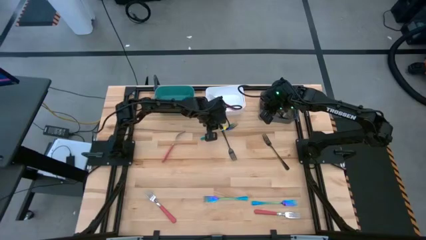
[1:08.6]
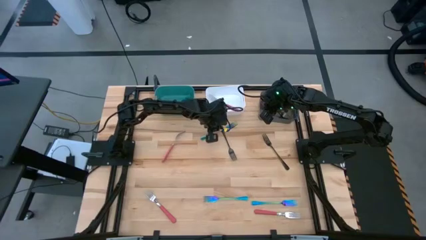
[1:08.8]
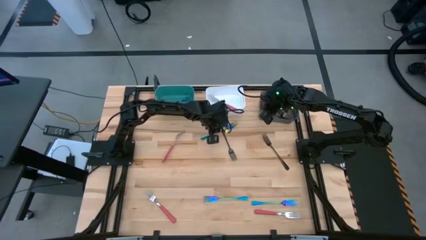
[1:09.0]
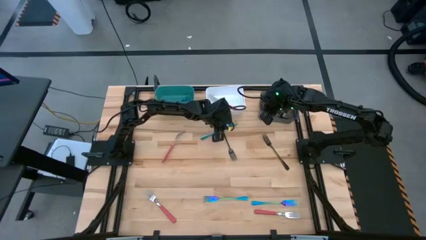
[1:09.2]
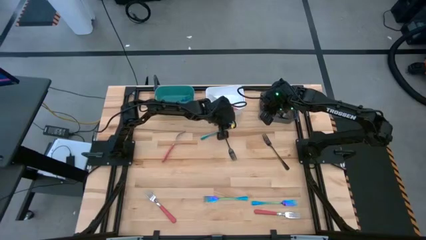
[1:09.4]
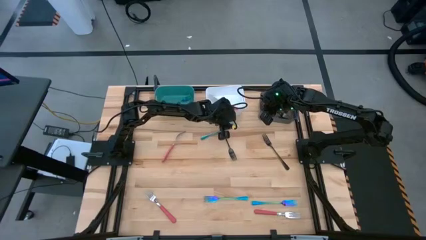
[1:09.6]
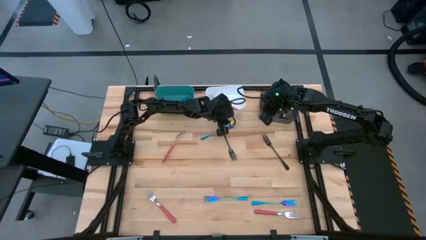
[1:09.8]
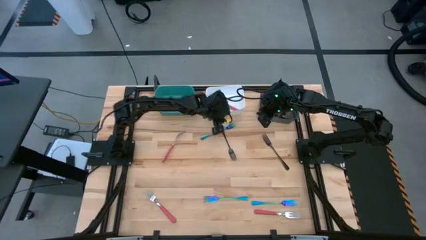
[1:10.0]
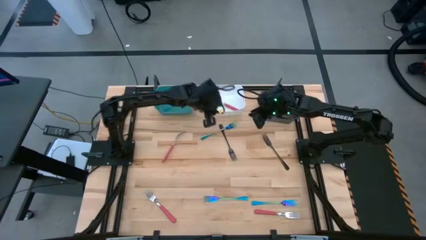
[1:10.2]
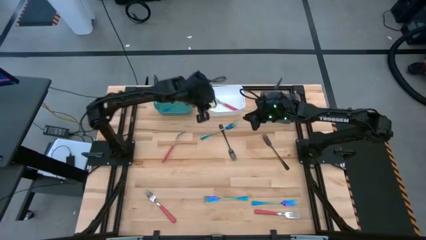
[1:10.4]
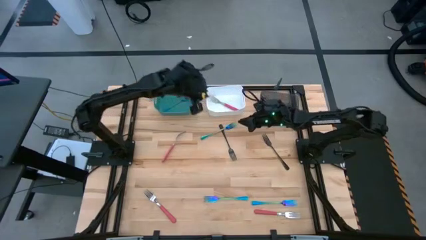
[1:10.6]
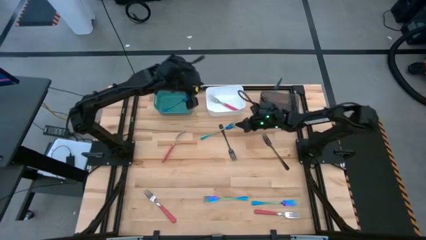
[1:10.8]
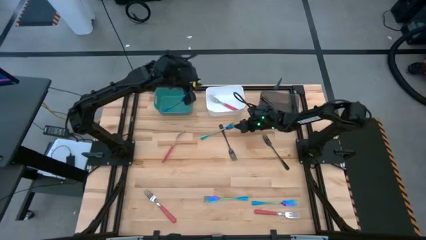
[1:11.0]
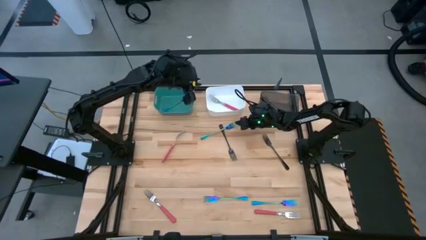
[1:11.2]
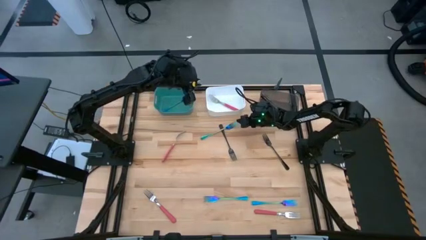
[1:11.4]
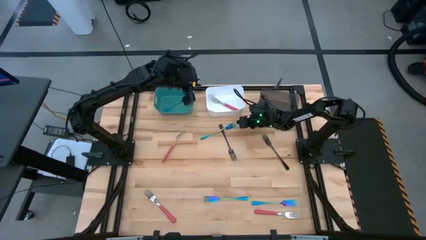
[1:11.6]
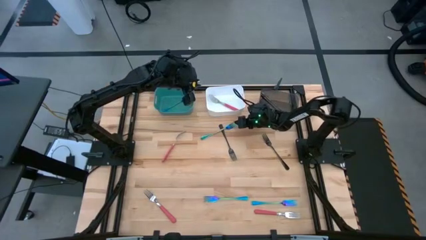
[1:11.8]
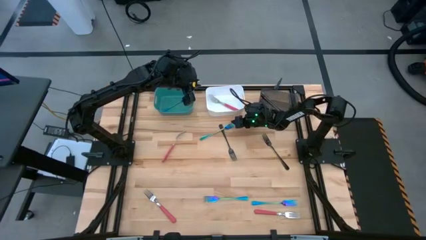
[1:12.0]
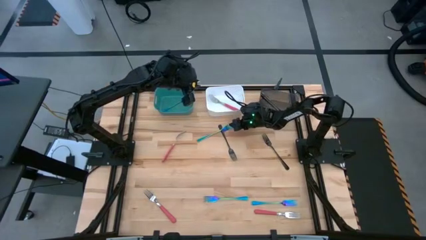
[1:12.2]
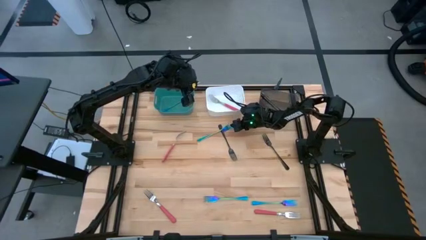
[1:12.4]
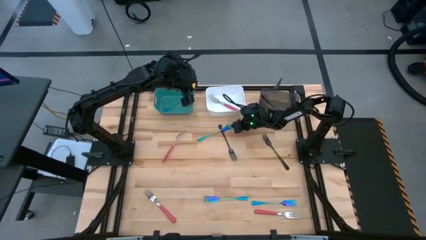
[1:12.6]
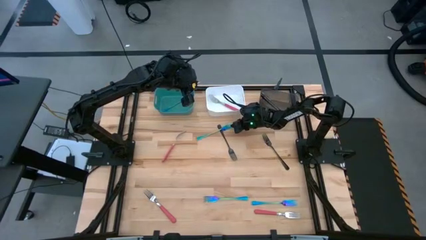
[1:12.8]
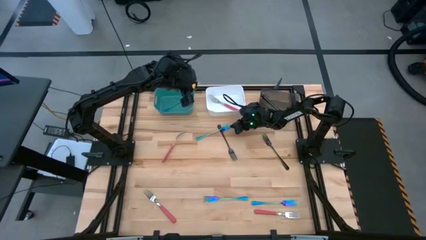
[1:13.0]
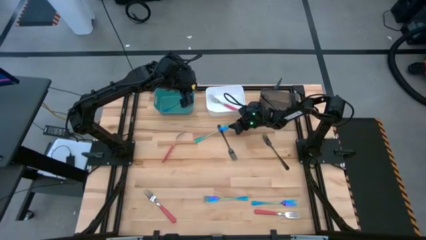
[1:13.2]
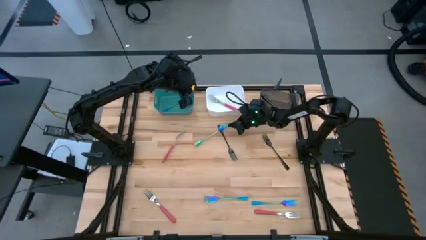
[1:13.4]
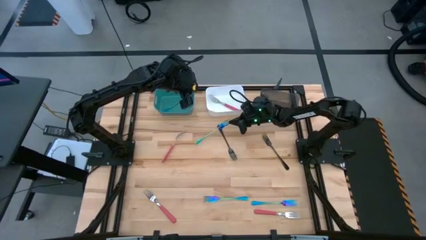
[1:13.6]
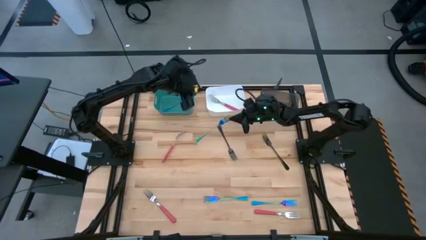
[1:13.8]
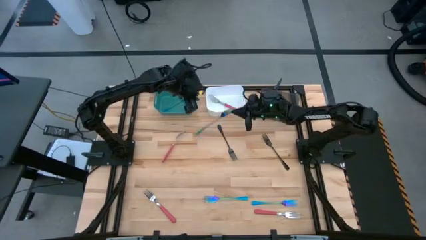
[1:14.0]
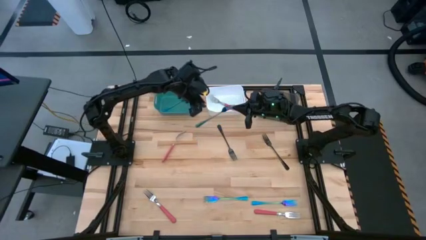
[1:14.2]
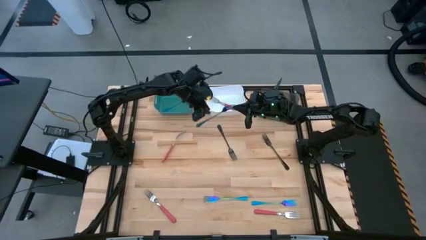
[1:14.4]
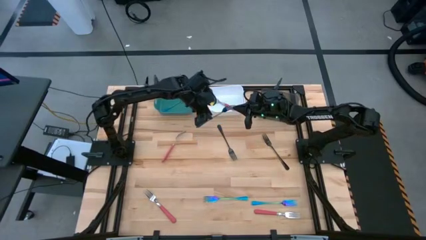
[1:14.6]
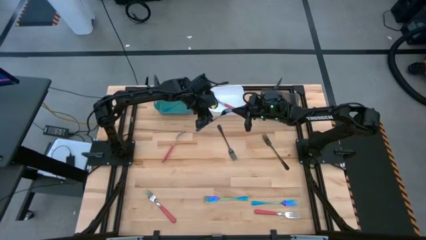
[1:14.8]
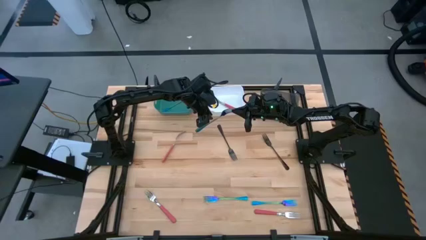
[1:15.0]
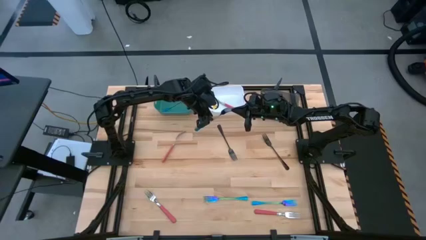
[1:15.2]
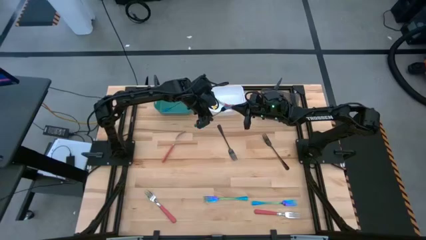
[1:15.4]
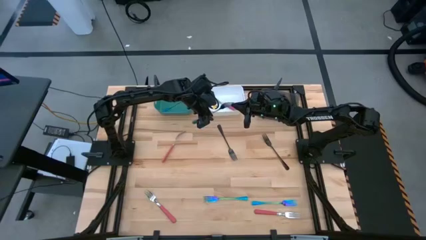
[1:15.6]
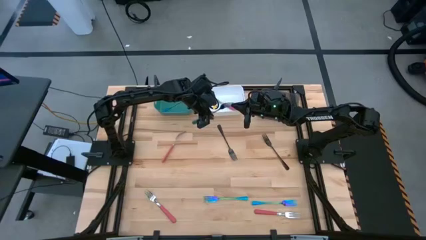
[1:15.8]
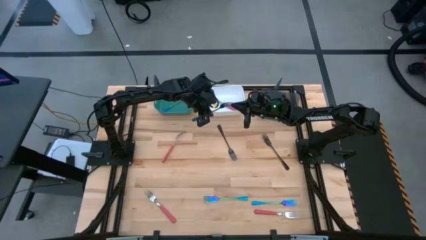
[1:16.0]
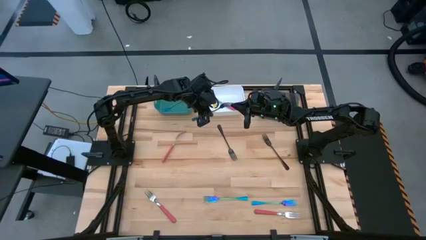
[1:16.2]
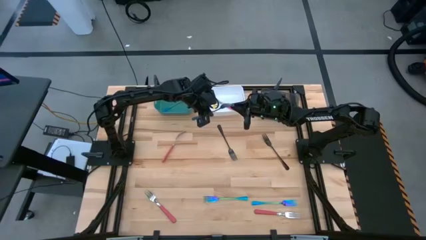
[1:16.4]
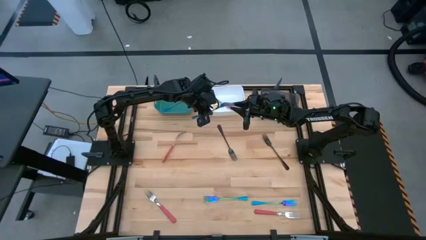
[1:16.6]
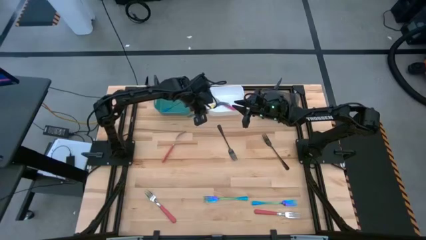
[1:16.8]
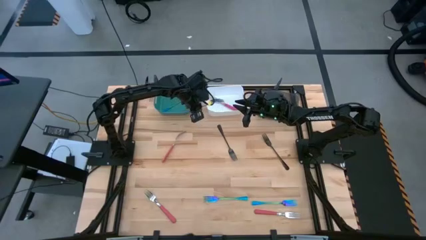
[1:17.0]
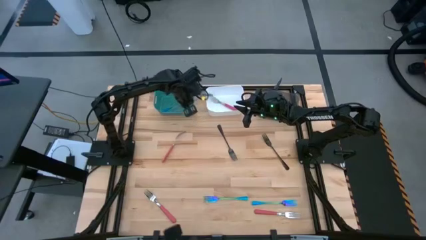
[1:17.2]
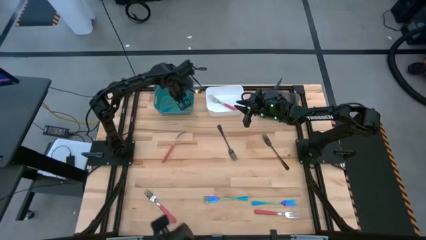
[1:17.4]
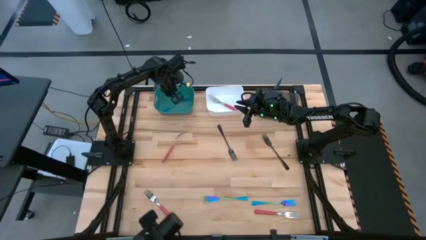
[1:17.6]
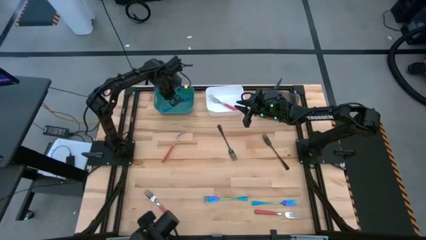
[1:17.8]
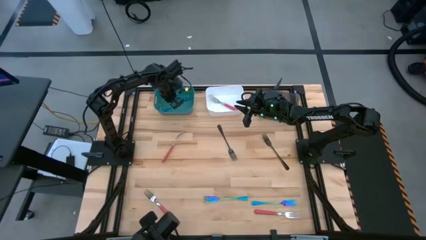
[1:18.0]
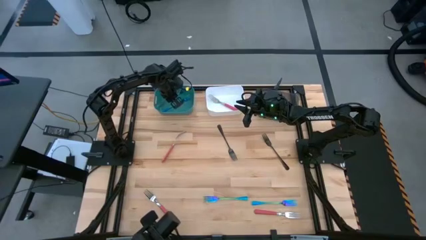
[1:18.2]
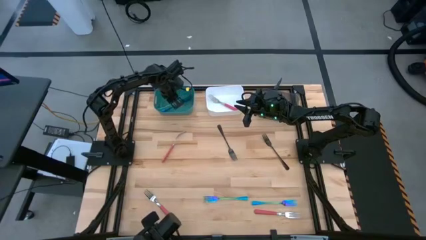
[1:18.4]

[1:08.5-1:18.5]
Task: Sort silverware by color (type)
Put the iridescent blue fork into the green bin

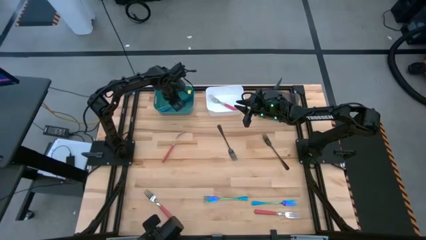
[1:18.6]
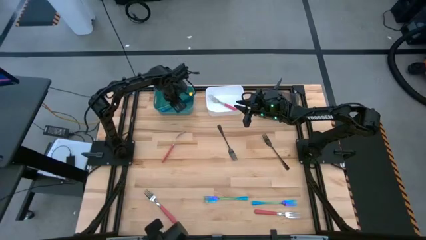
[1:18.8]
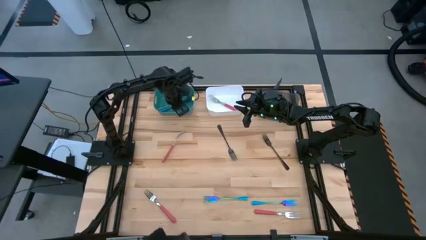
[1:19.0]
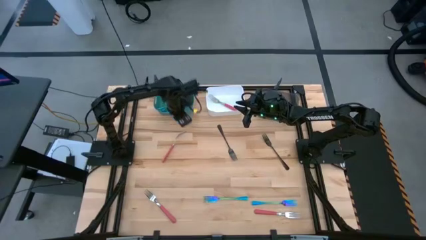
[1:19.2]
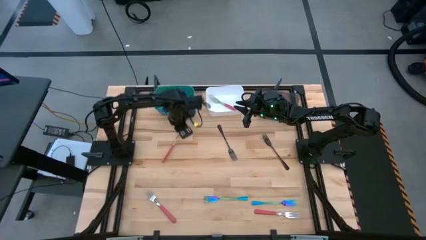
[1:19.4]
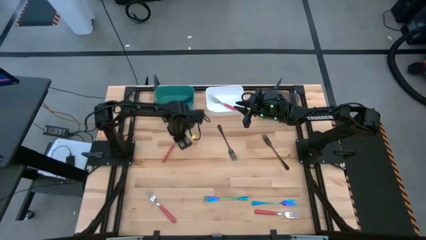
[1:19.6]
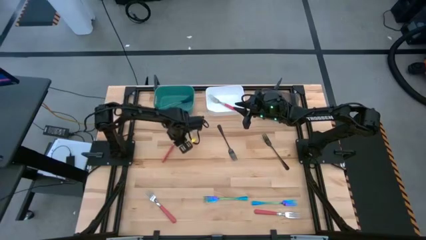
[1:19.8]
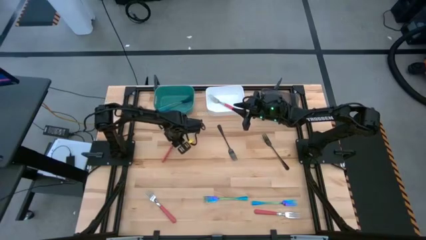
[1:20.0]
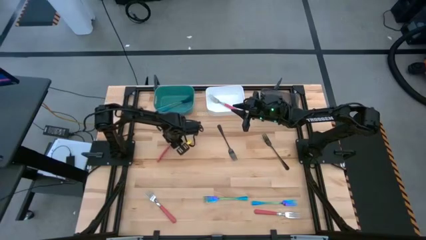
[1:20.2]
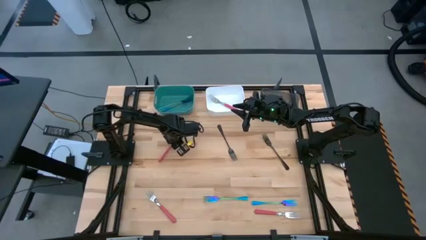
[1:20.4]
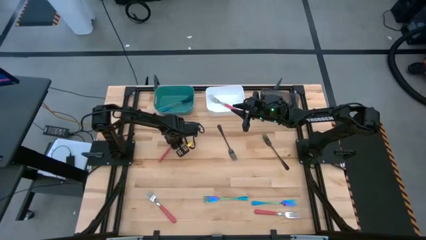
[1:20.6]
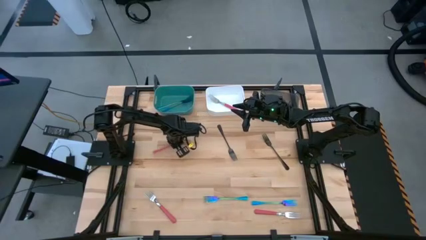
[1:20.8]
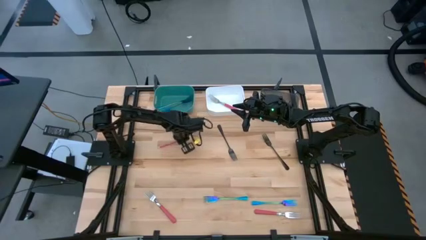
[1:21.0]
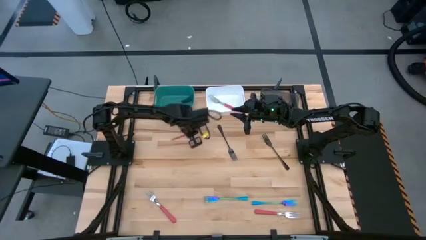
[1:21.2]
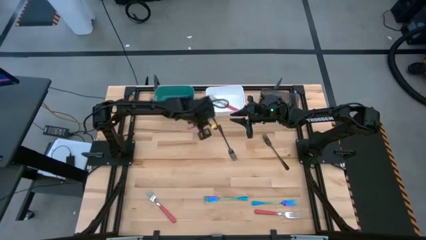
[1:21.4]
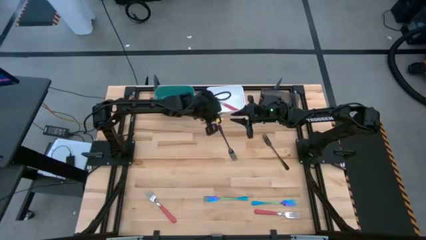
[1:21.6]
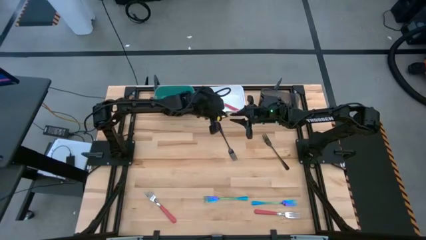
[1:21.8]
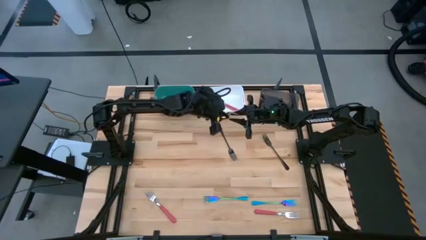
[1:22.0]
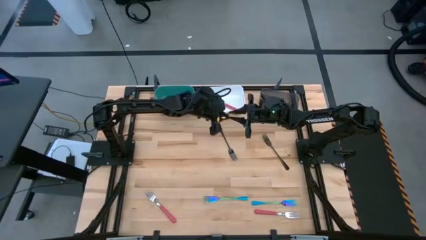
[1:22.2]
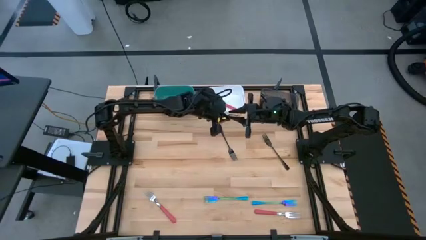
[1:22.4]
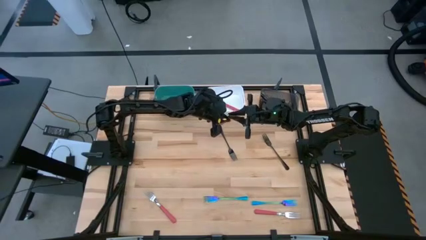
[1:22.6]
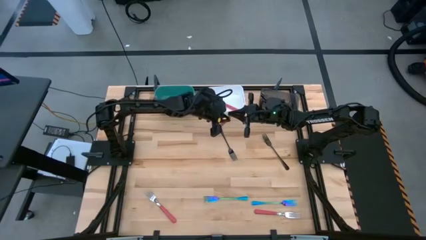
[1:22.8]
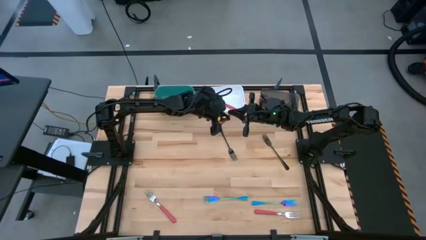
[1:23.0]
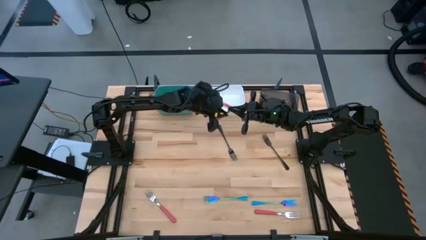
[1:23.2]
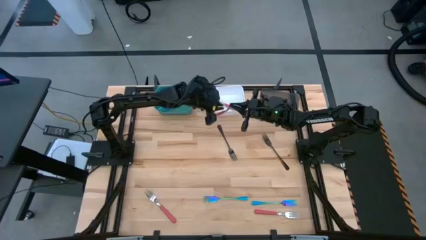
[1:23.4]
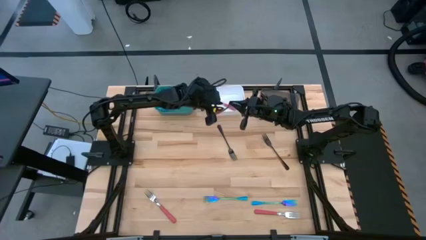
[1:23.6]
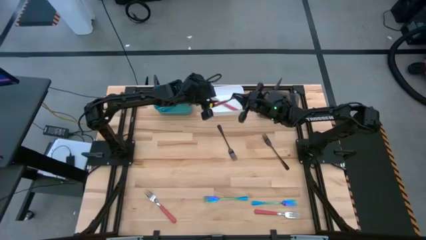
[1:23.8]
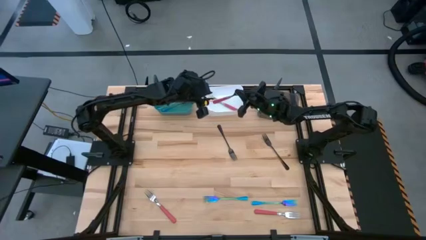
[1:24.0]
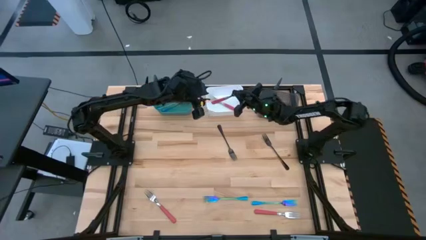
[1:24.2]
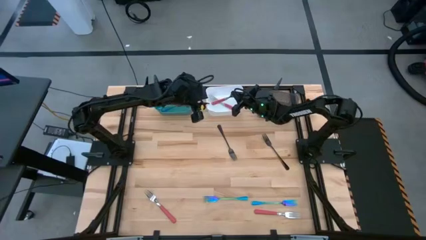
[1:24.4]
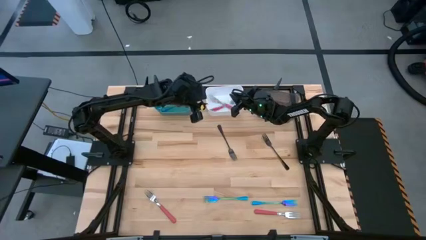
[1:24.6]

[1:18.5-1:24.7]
Put the red fork into the white bin
